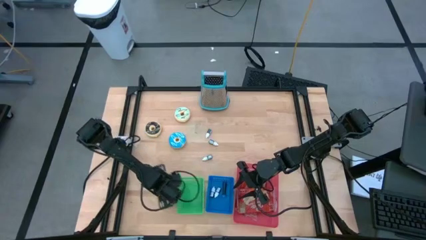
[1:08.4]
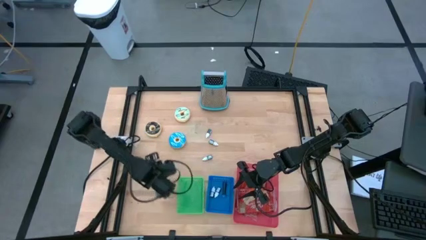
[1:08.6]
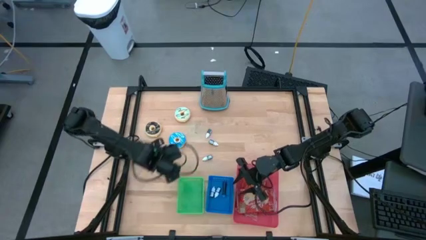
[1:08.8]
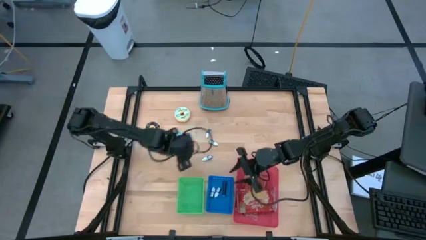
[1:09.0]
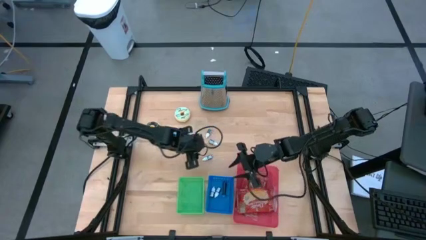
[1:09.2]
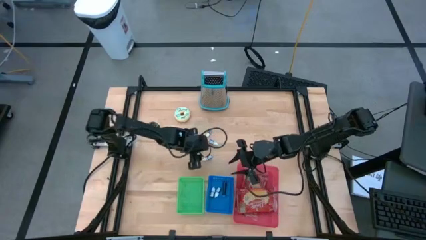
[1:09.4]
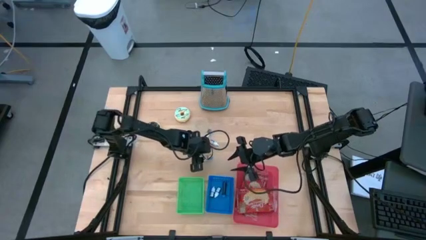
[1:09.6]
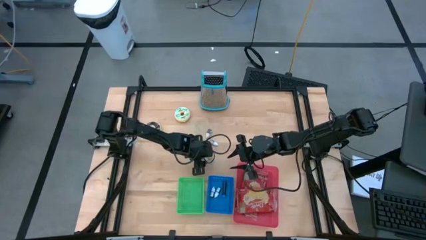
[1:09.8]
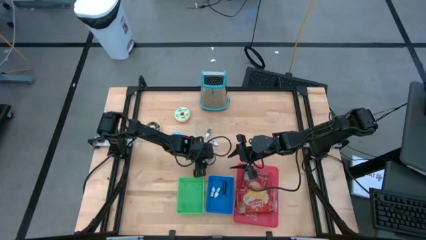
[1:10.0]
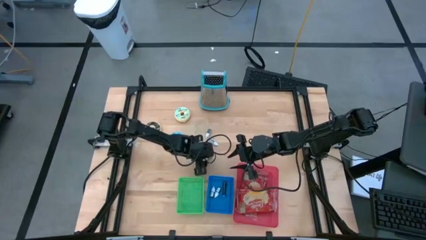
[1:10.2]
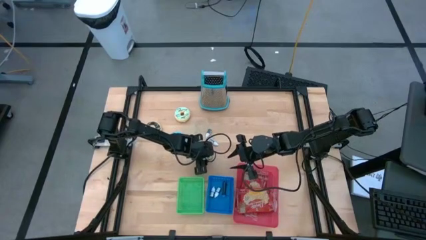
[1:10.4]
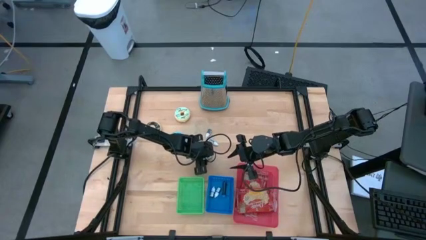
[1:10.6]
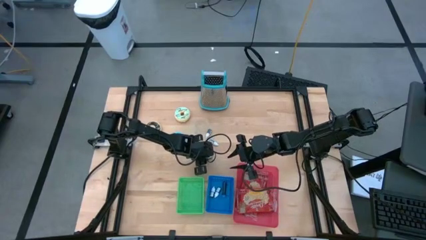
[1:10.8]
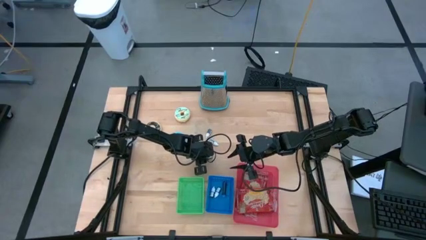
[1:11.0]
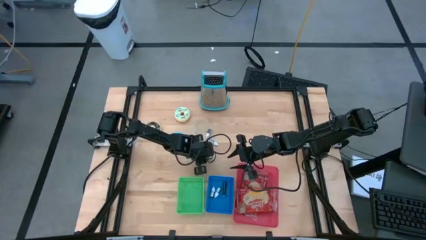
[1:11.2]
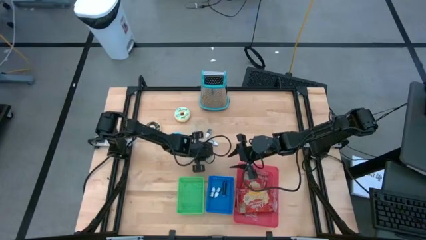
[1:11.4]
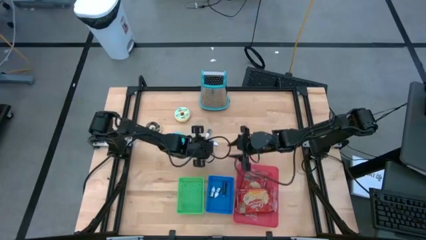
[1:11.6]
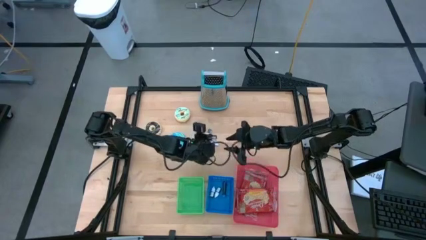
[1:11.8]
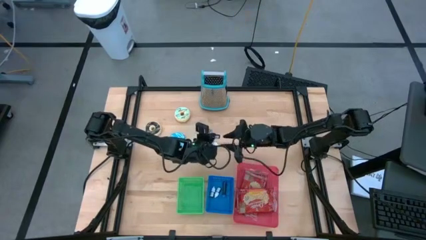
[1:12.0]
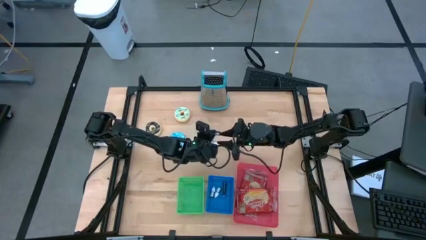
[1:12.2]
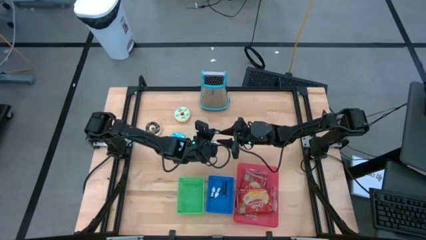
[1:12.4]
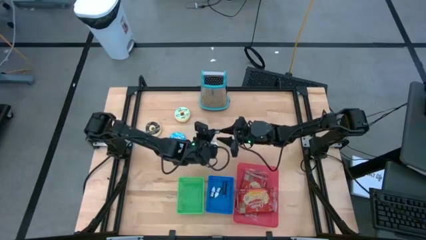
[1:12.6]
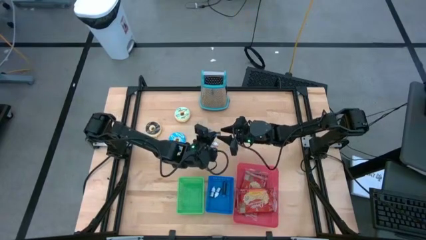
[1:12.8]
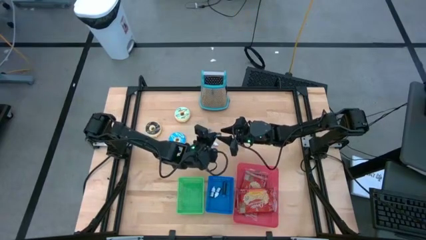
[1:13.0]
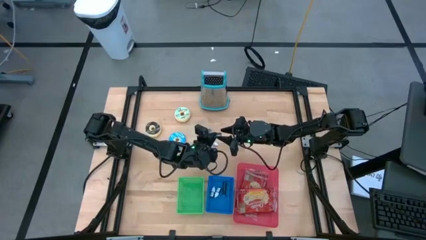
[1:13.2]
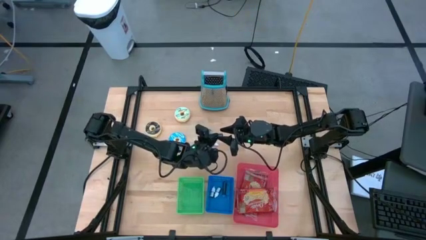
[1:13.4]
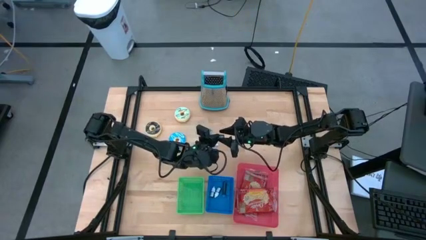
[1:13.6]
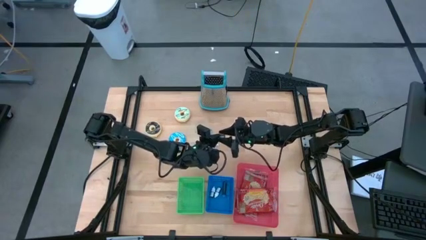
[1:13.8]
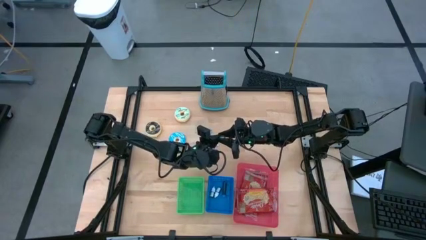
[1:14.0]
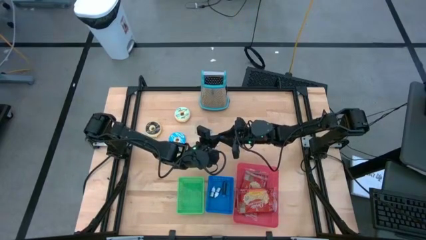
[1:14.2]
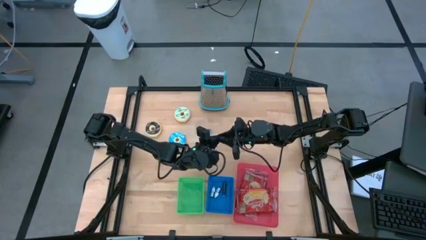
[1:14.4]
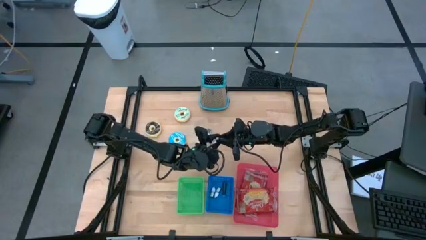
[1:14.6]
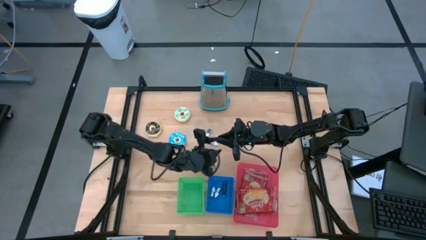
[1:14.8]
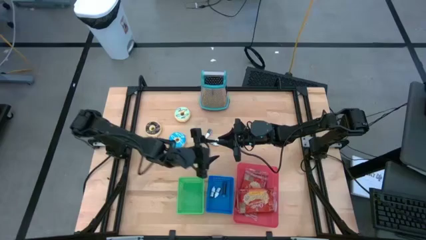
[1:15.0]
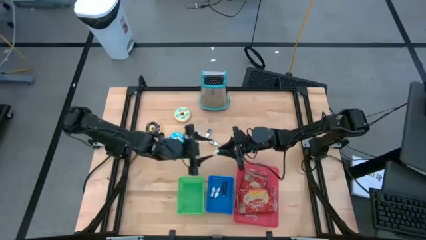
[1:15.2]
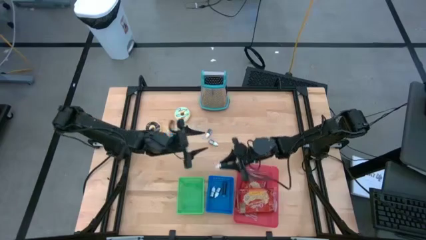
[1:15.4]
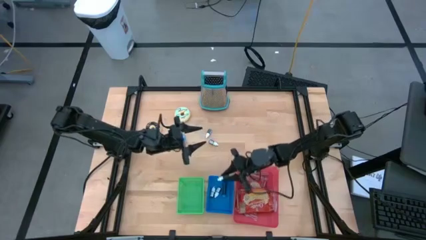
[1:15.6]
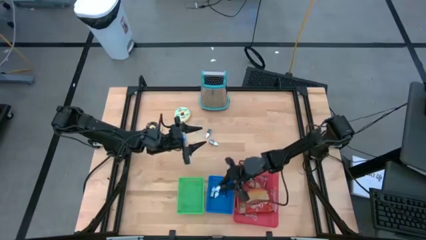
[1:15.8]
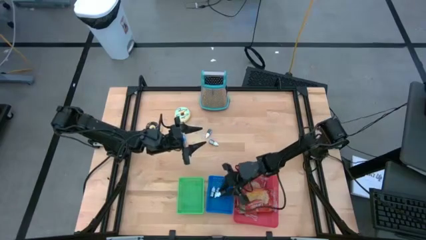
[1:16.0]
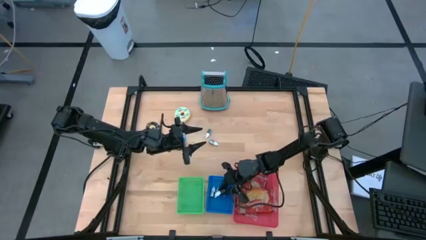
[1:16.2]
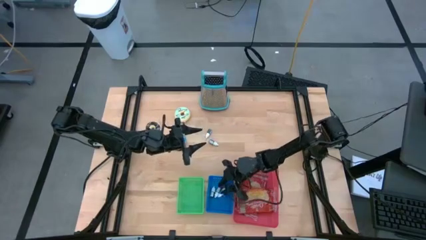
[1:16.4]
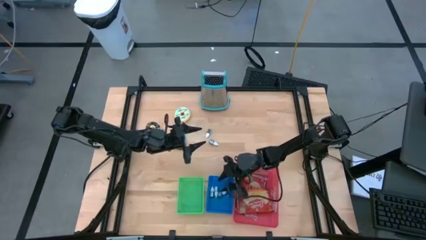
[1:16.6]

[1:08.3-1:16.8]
Put the dark blue food coloring bottle into the blue bin

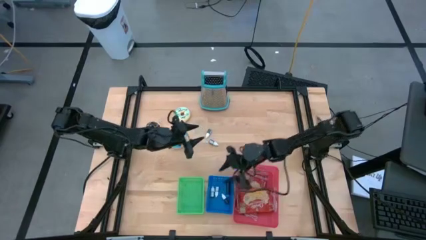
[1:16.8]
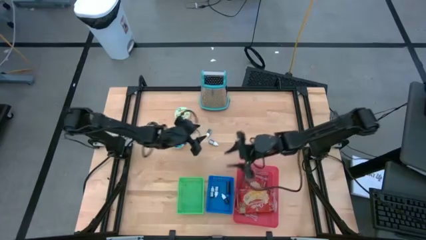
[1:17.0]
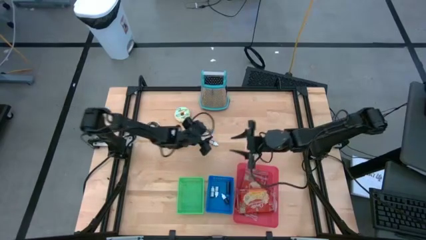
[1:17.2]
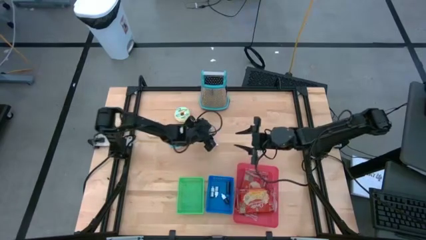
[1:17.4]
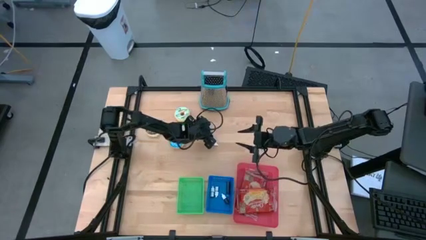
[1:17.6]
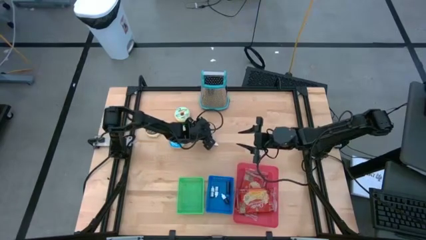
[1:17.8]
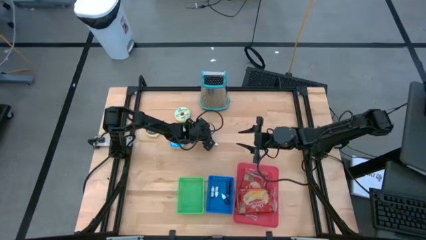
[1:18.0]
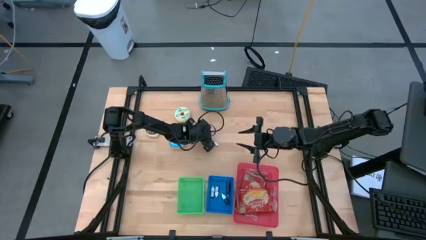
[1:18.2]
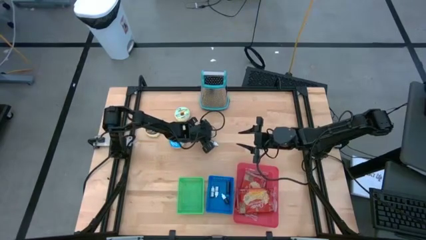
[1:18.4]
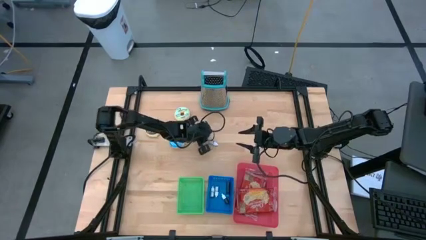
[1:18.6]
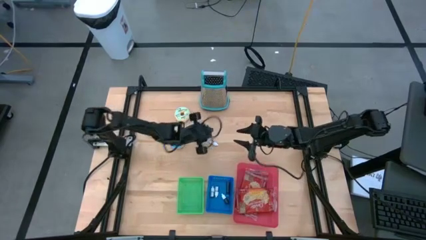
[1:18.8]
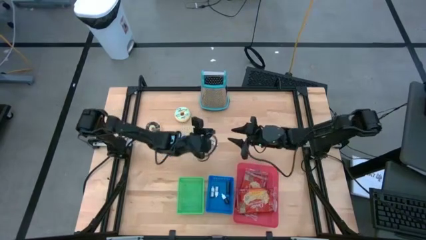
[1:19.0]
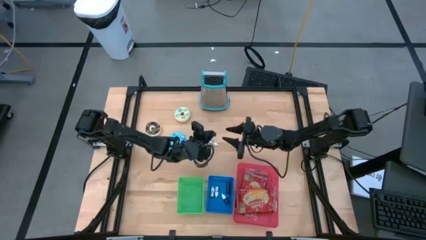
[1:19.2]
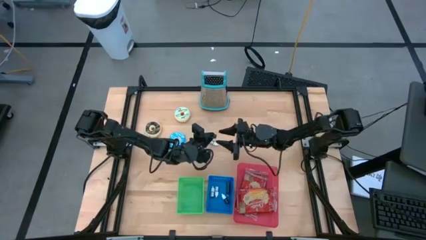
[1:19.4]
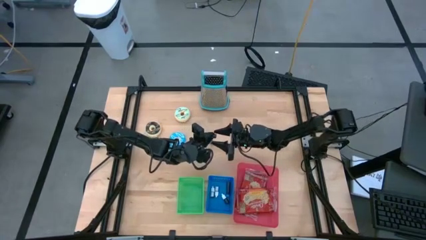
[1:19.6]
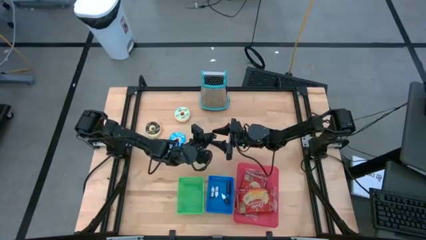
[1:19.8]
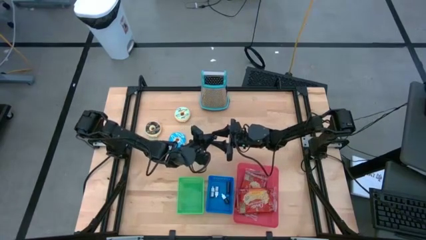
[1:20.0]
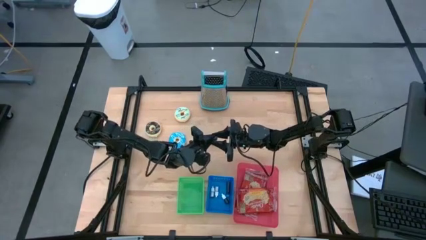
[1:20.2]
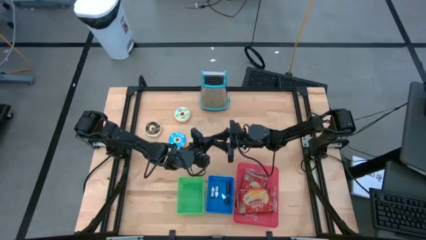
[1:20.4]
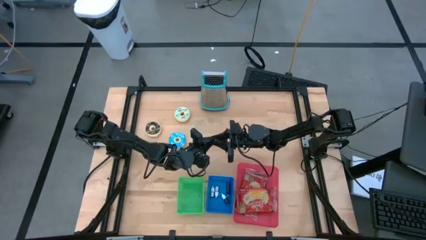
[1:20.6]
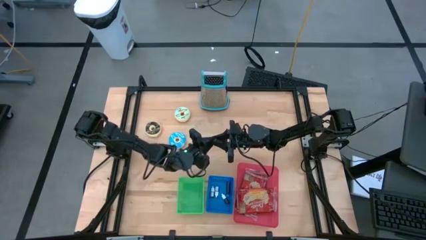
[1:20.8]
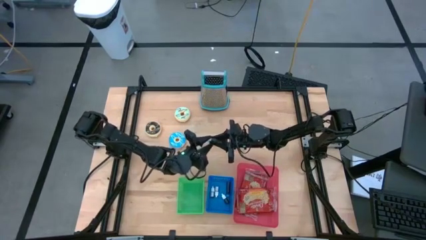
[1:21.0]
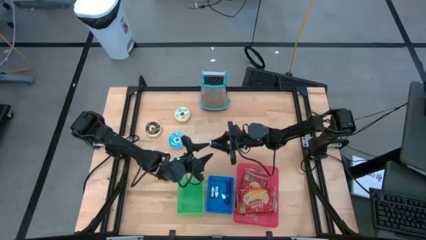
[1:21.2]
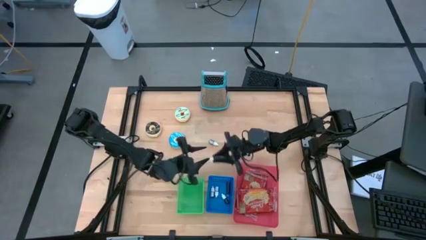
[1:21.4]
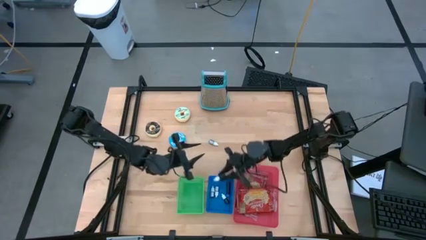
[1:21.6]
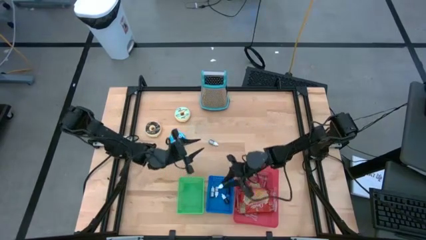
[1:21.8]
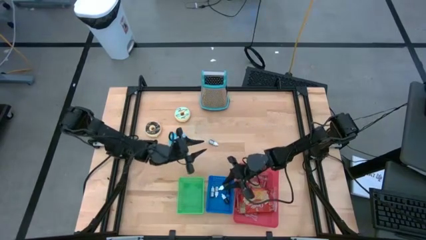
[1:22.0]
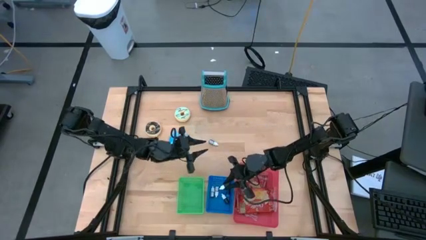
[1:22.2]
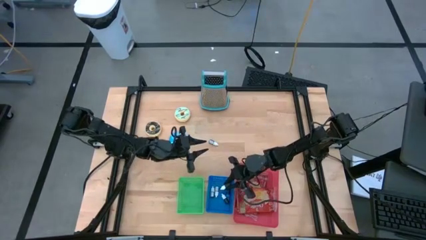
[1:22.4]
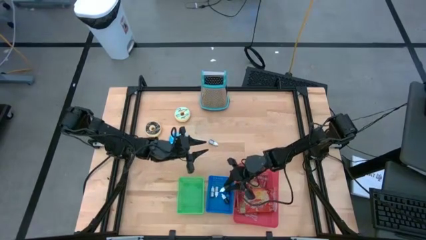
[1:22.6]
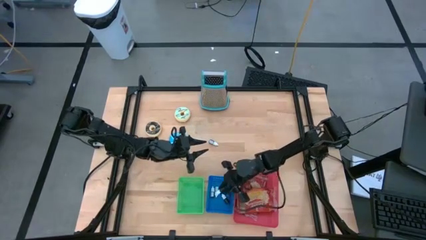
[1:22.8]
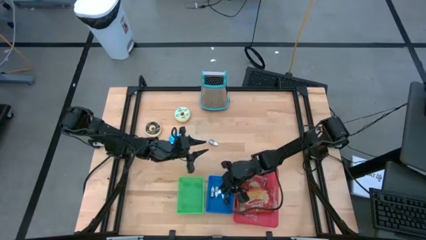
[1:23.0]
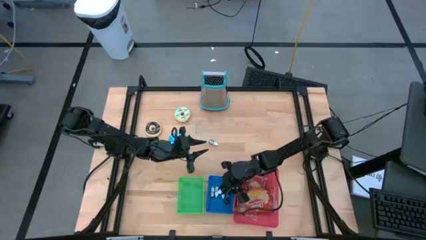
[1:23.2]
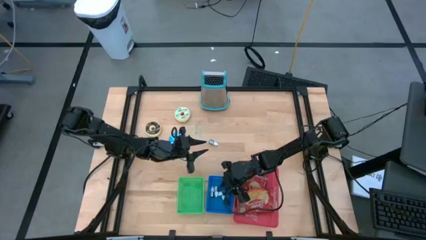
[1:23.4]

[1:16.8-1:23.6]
Put the green food coloring bottle into the blue bin
